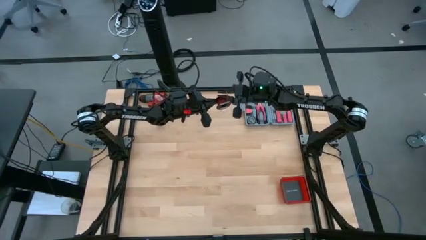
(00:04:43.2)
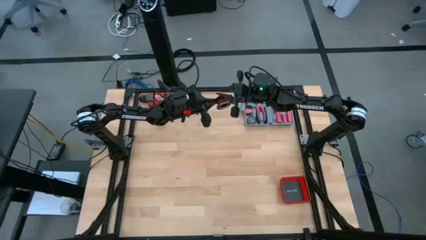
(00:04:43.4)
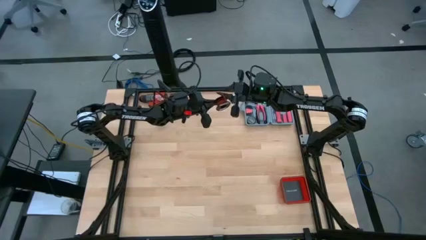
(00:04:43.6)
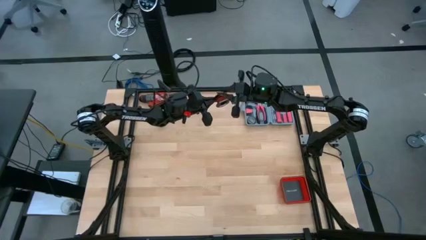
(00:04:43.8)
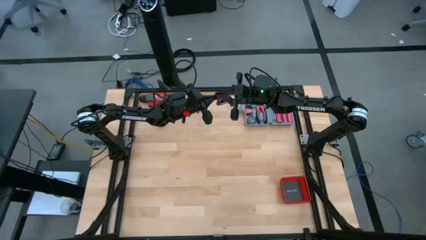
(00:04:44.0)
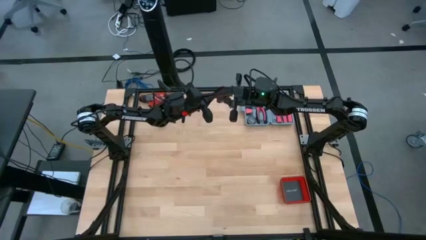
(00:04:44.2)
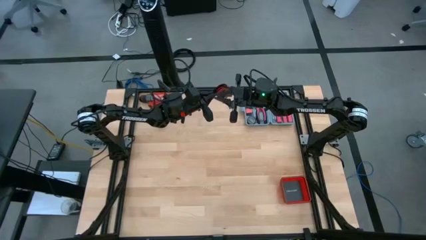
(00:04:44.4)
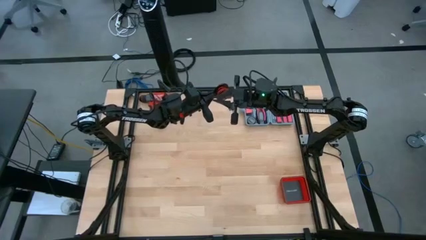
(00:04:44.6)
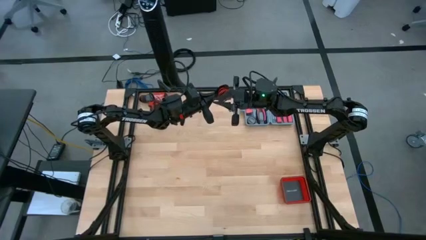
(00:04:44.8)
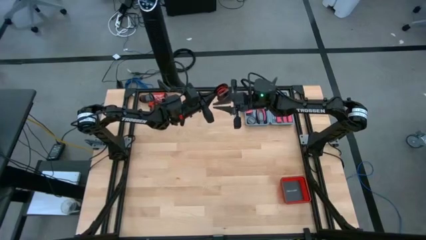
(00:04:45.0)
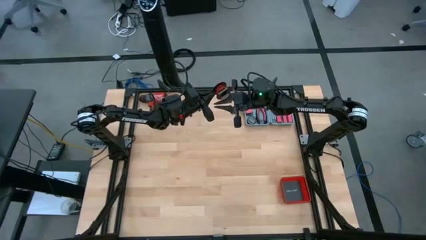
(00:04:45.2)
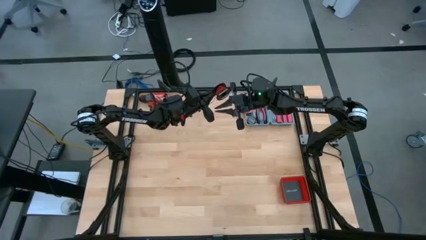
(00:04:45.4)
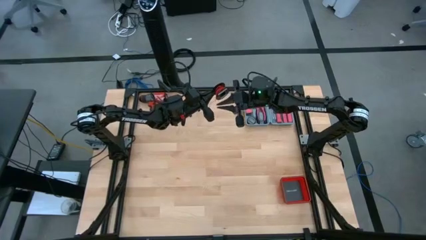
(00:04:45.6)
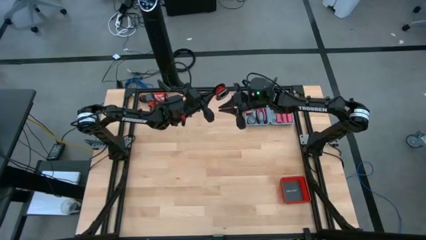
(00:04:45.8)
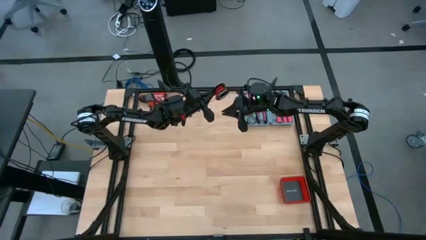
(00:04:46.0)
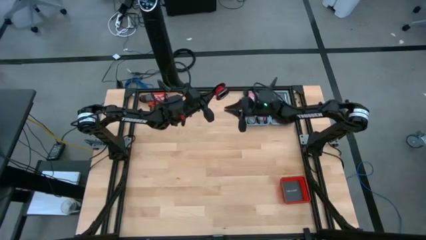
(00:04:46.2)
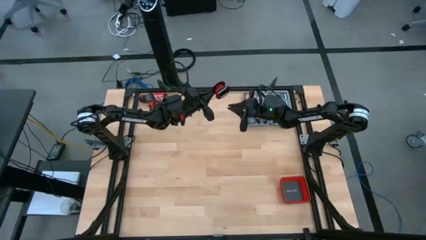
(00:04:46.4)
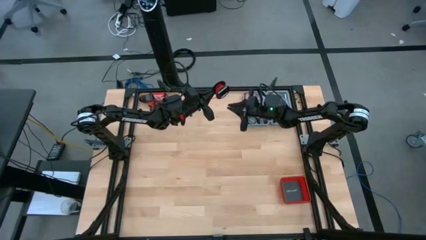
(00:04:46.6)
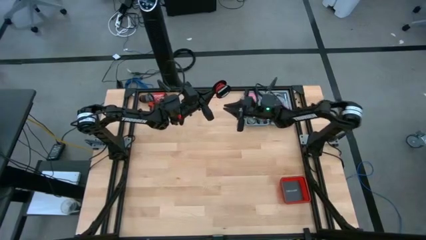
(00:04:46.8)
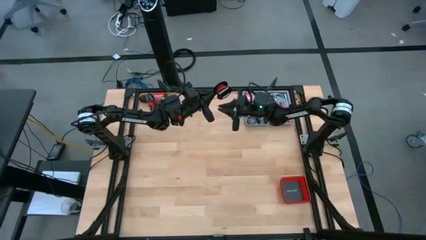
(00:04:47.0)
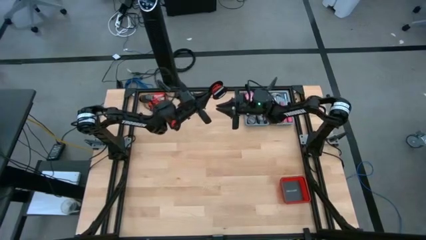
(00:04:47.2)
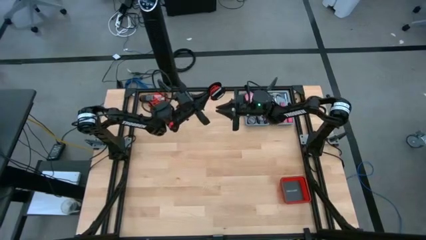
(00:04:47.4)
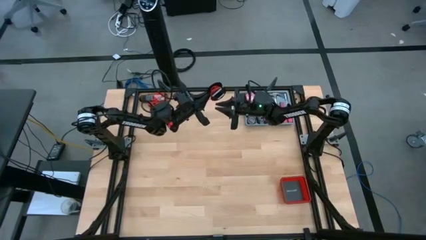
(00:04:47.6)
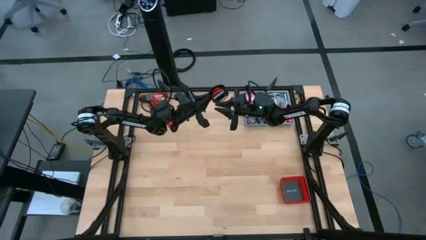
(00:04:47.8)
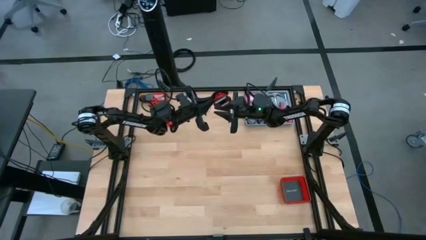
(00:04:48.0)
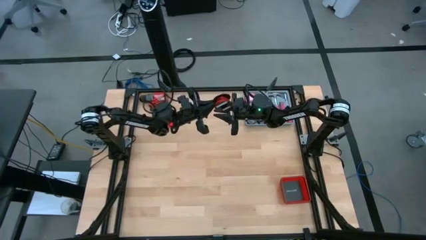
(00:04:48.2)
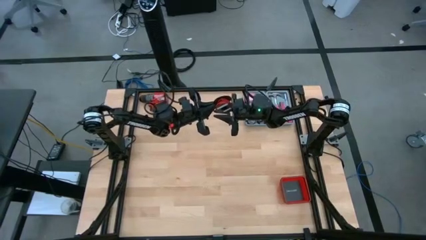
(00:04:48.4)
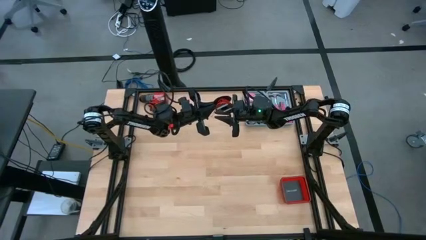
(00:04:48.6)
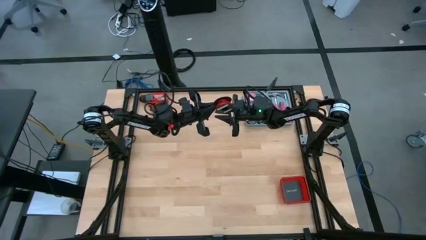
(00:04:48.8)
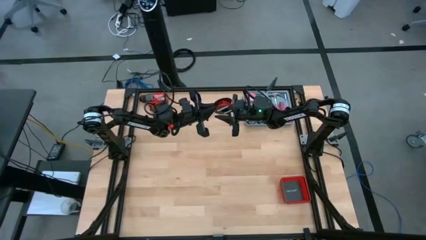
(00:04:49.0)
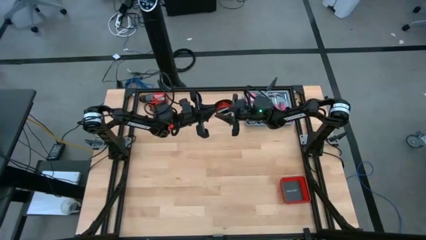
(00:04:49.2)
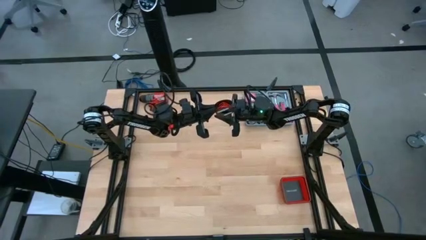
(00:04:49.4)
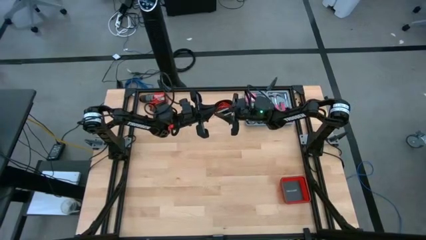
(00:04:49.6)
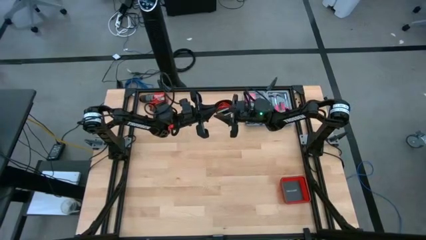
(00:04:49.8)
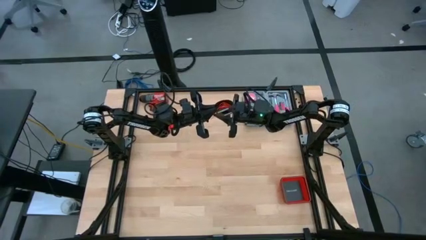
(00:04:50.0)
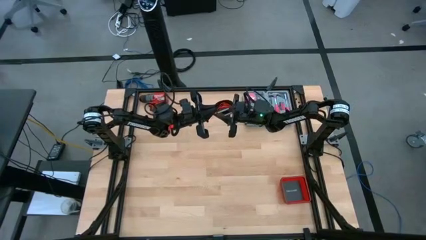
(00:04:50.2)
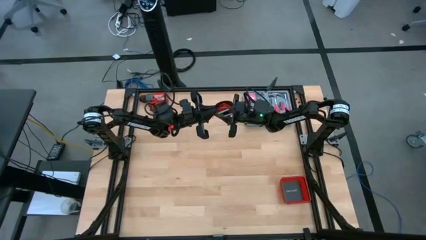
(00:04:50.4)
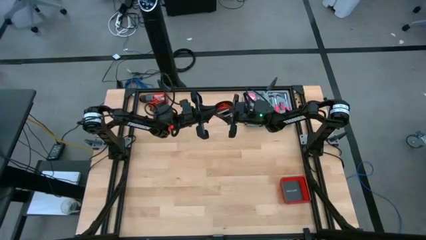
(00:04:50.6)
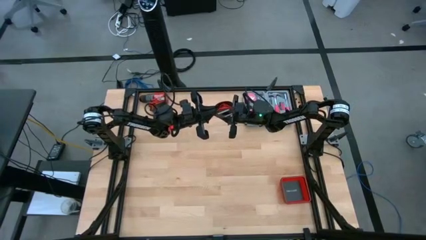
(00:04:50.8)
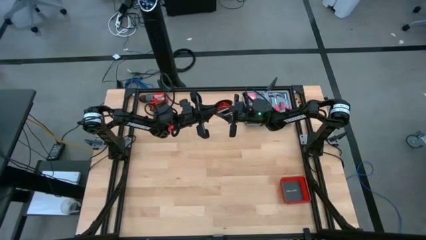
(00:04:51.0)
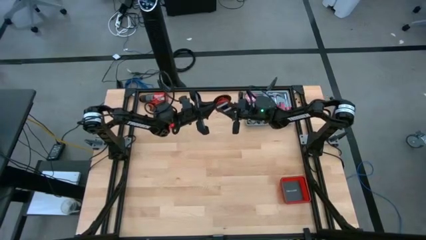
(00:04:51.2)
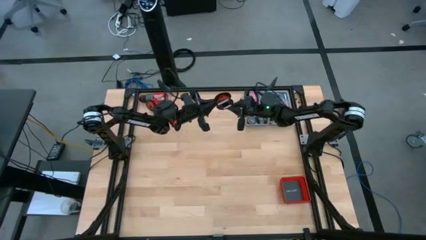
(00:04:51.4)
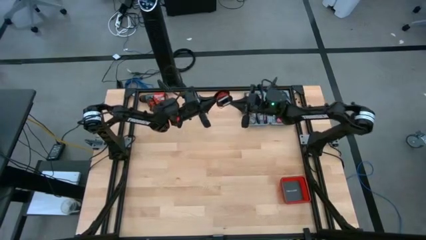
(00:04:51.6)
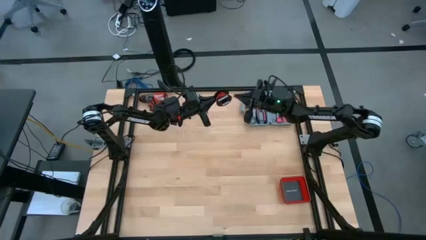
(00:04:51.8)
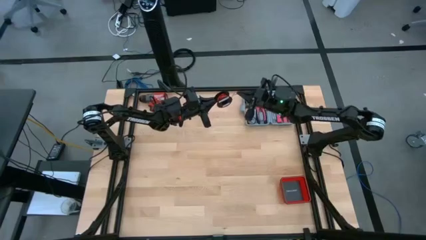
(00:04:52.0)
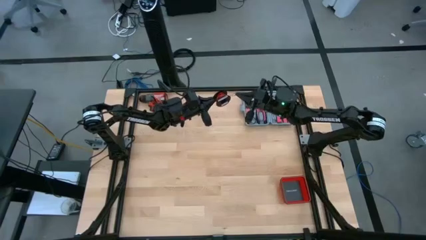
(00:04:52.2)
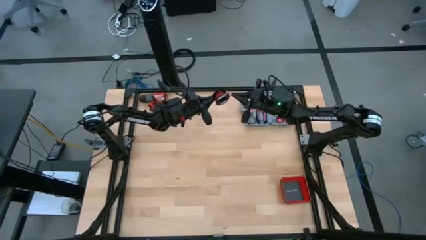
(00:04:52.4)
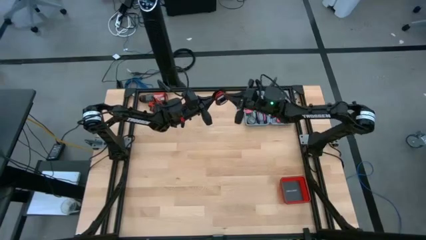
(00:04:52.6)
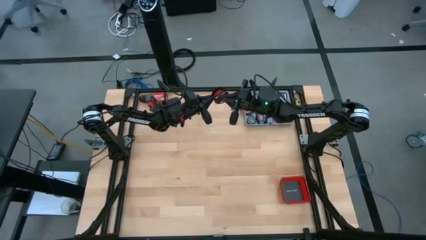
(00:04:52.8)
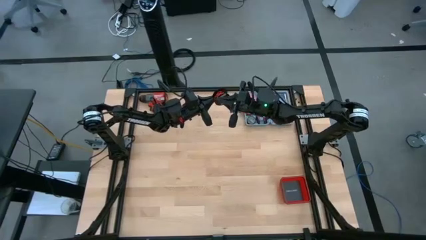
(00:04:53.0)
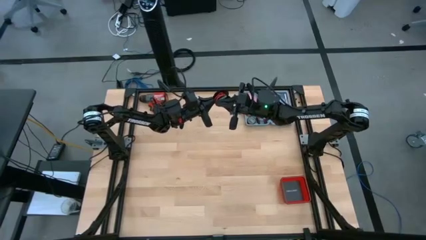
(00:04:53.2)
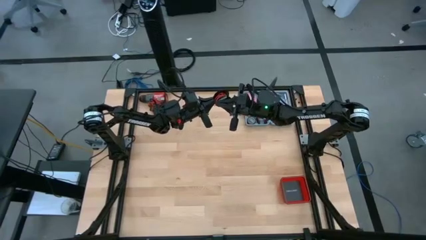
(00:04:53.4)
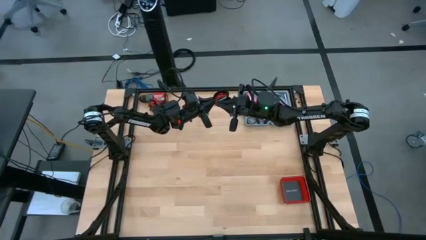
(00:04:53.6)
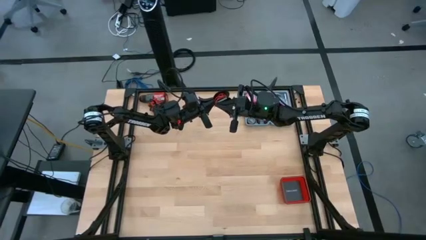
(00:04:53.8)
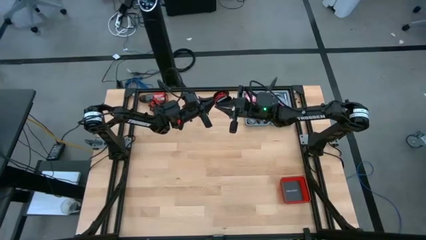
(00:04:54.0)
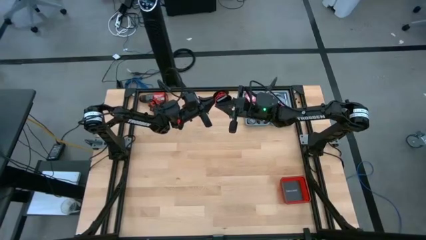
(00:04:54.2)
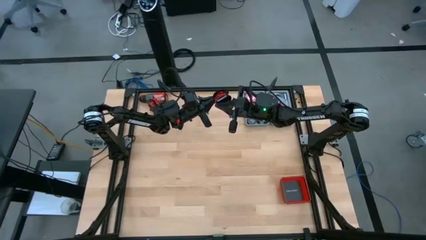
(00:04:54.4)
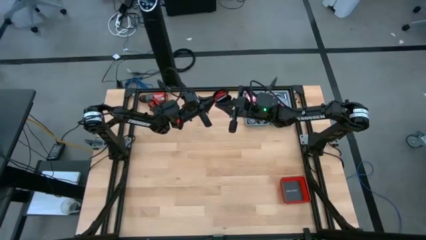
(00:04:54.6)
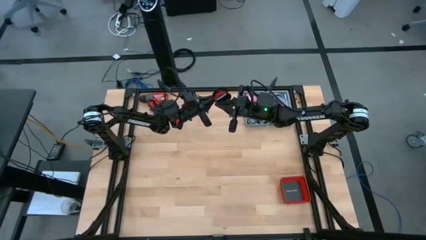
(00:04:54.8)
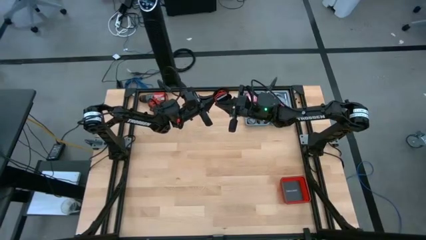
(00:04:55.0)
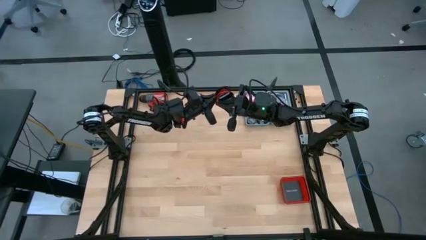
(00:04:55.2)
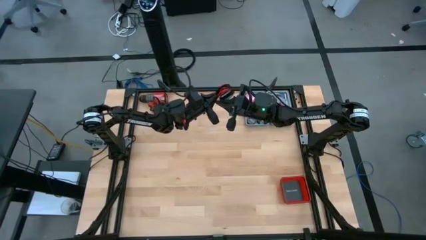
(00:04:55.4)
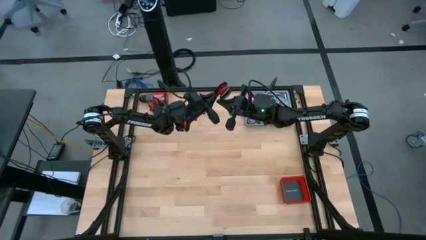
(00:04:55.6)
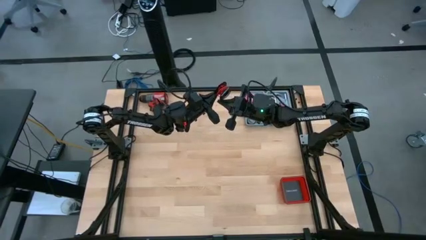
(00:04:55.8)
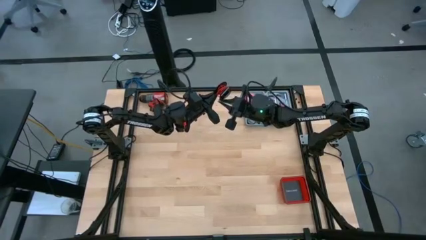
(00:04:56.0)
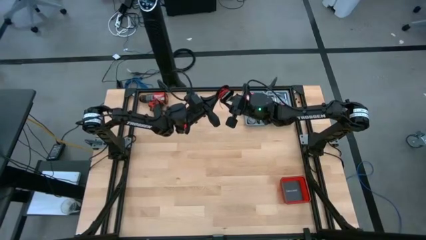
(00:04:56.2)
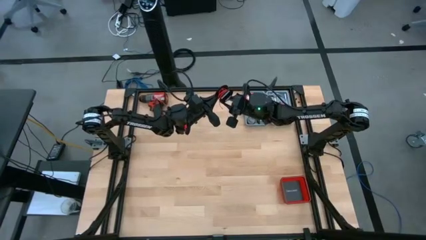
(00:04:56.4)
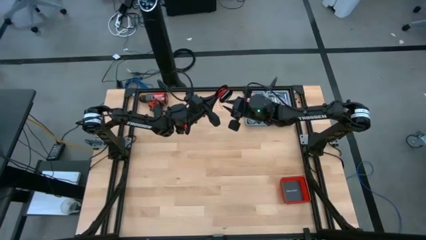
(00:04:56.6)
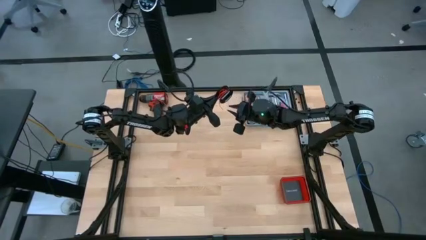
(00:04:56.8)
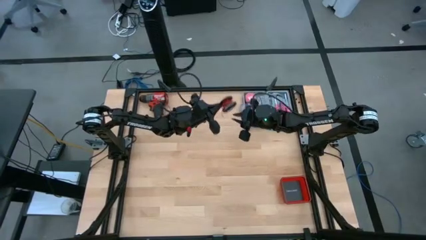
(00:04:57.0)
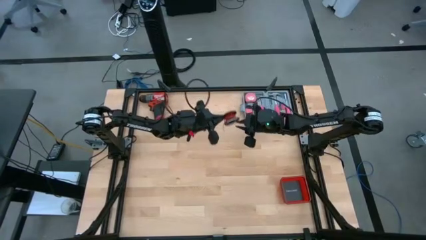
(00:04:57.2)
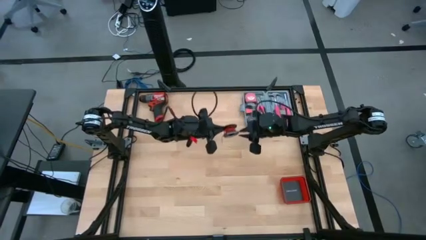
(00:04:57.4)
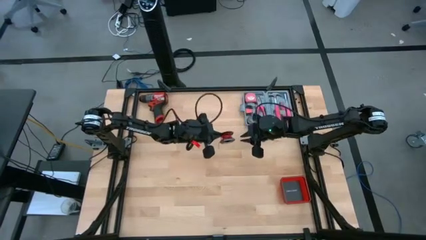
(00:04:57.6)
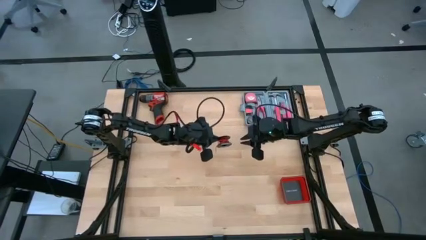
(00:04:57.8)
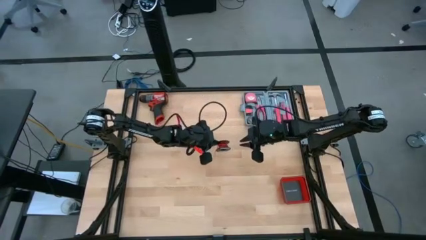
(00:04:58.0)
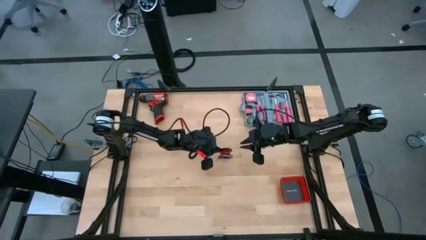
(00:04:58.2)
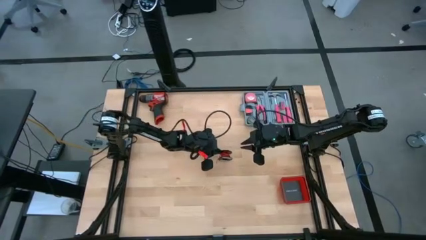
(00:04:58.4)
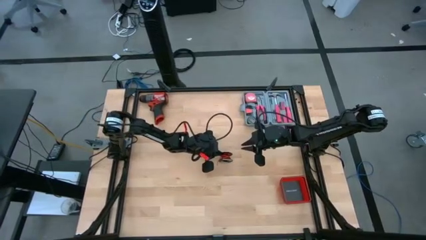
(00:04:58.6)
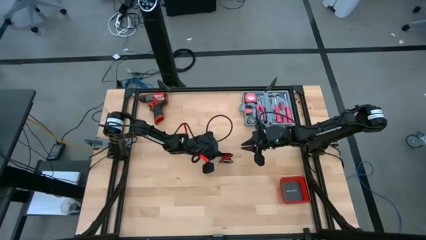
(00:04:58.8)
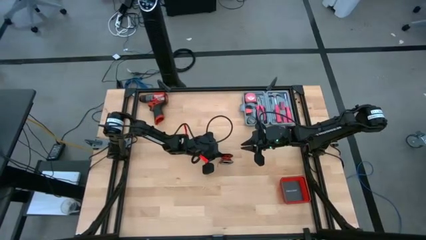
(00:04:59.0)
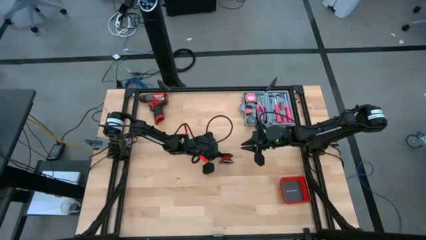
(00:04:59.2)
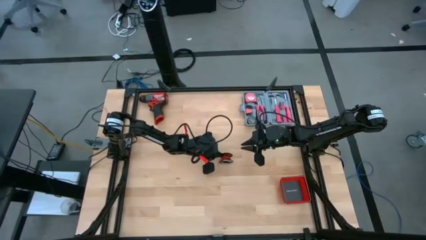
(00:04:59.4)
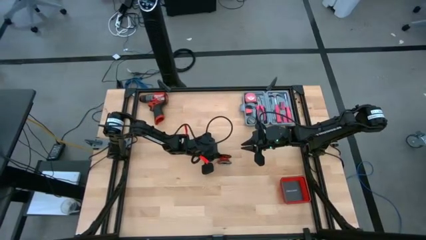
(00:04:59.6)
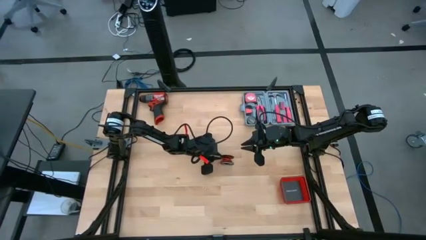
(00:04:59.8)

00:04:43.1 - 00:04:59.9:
Task: Coil cords
Coil the red wire on the black spool
